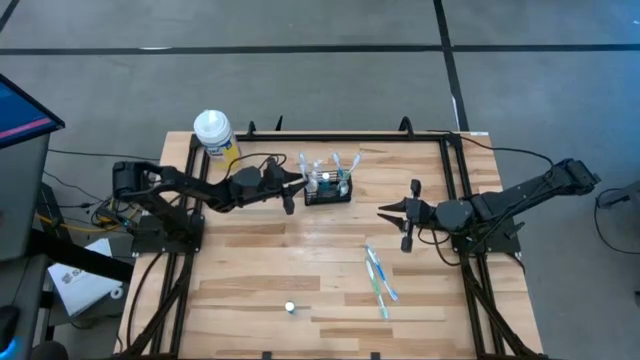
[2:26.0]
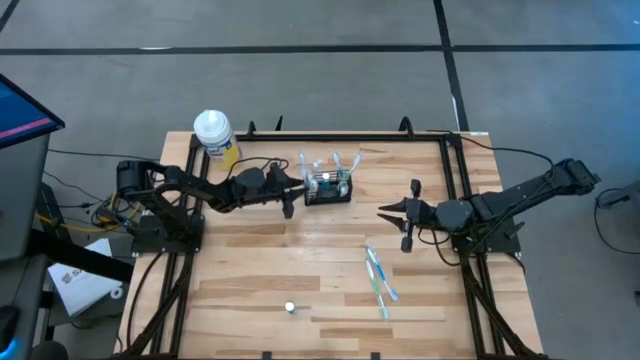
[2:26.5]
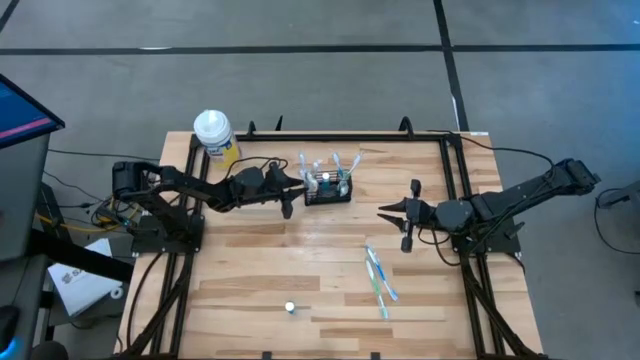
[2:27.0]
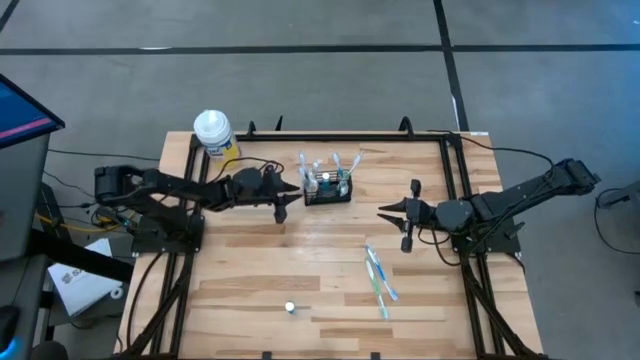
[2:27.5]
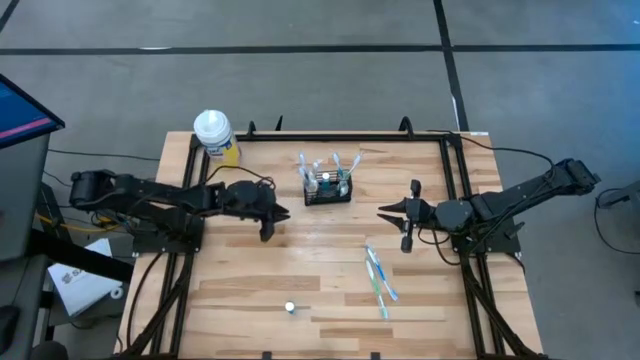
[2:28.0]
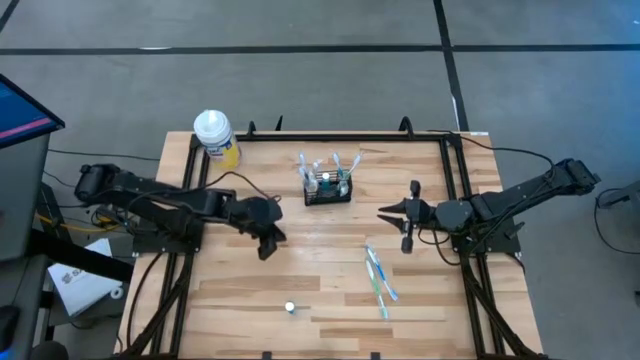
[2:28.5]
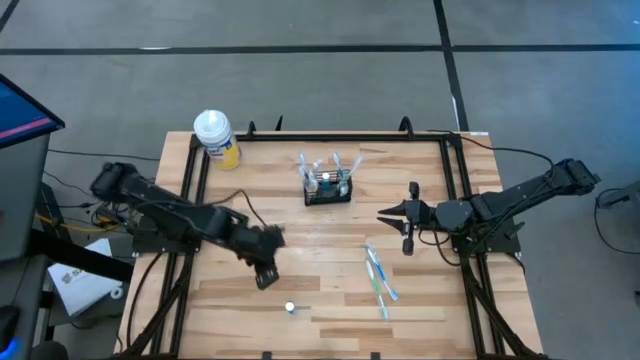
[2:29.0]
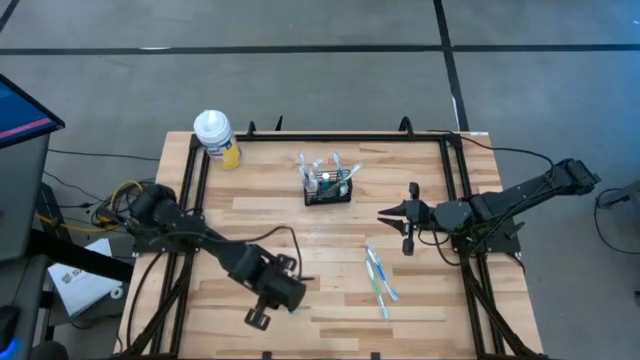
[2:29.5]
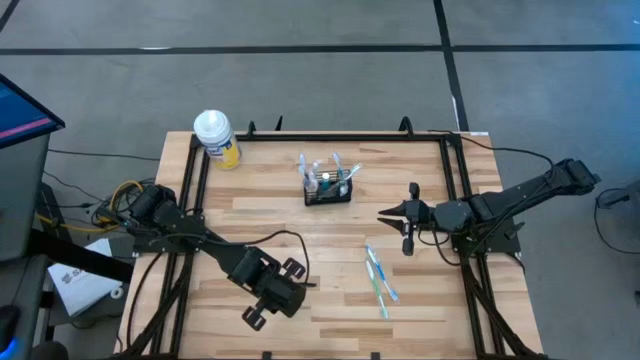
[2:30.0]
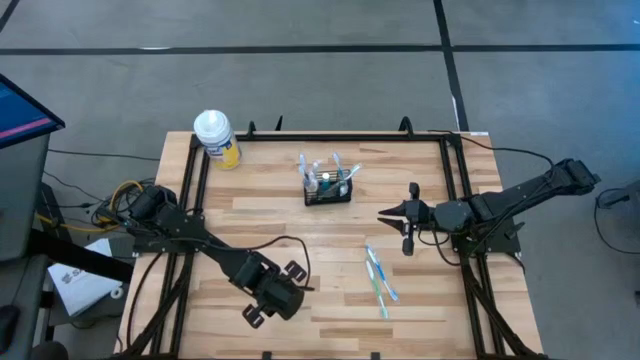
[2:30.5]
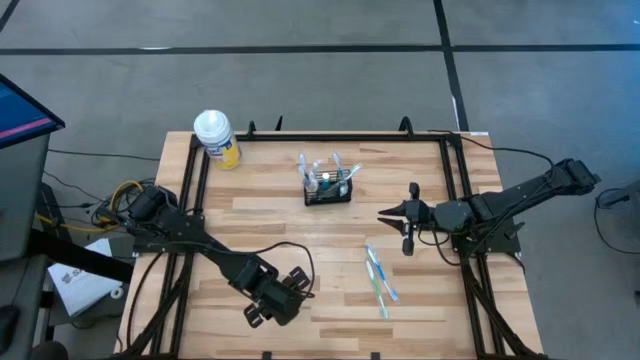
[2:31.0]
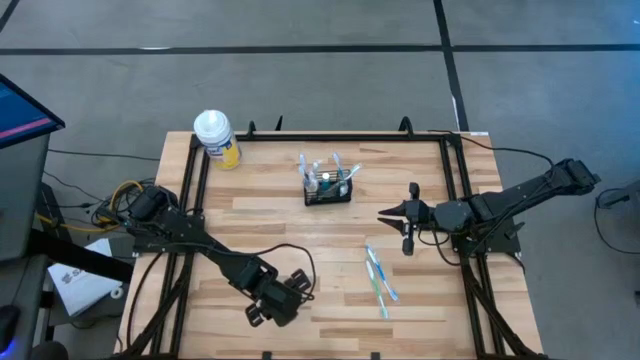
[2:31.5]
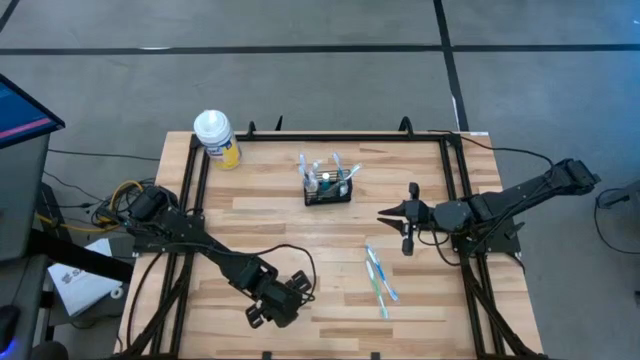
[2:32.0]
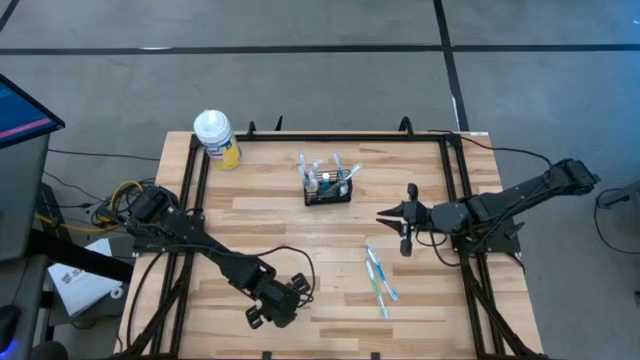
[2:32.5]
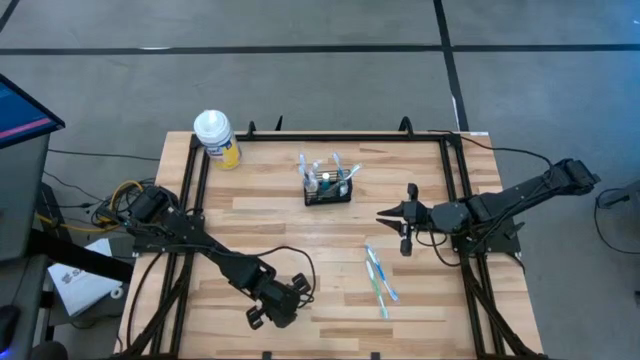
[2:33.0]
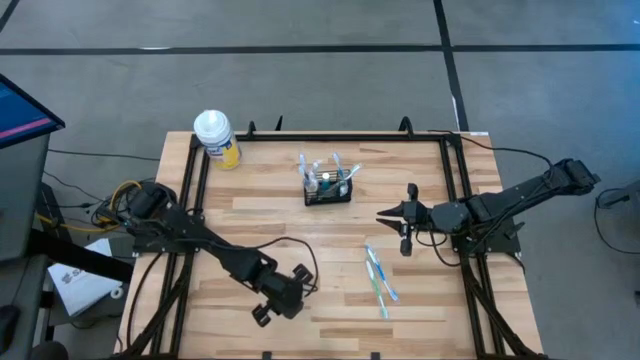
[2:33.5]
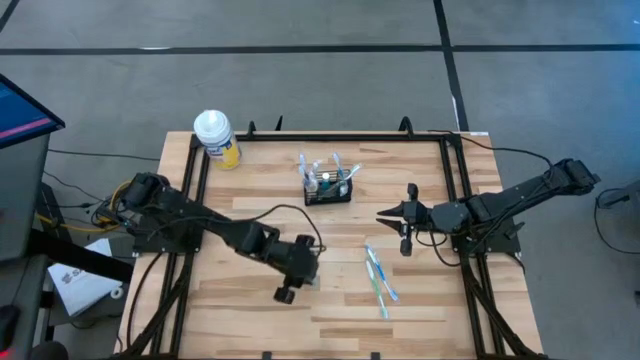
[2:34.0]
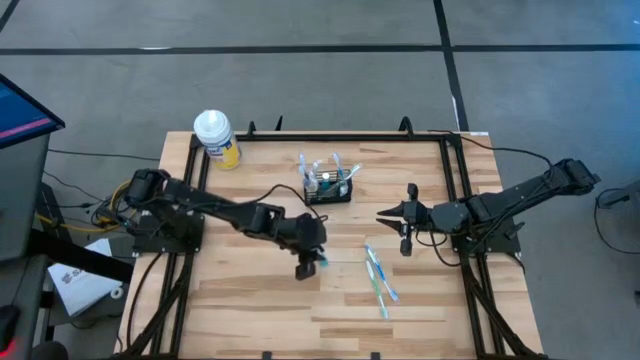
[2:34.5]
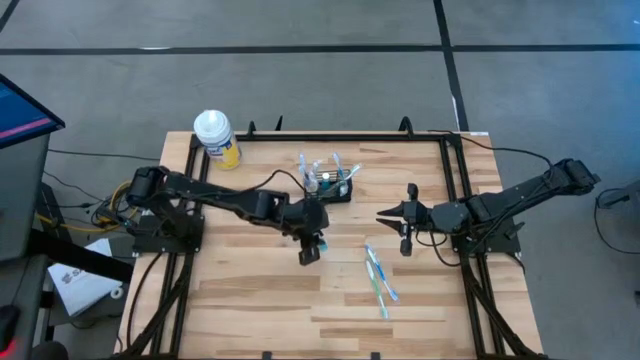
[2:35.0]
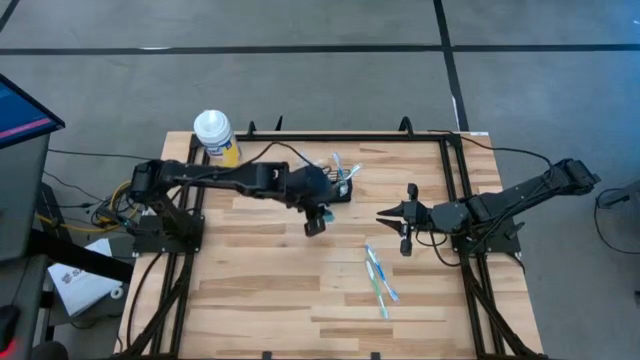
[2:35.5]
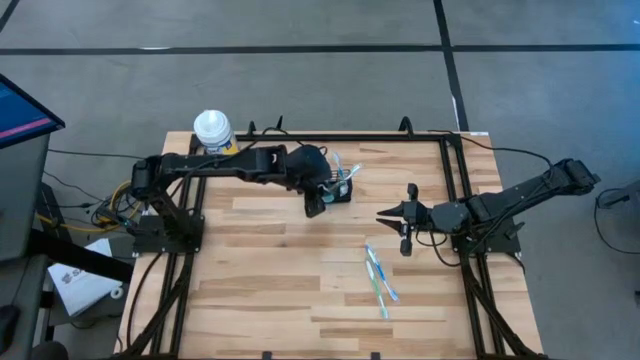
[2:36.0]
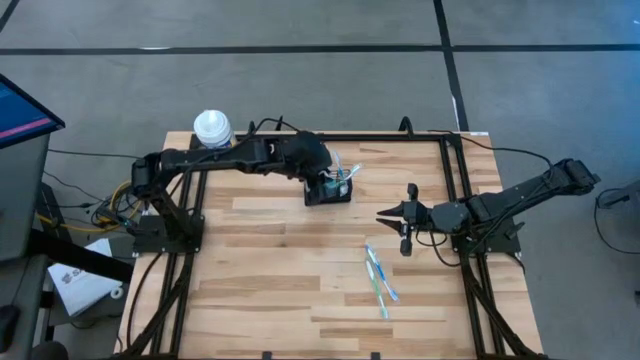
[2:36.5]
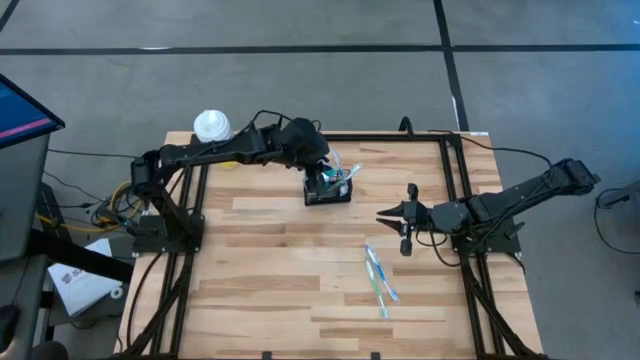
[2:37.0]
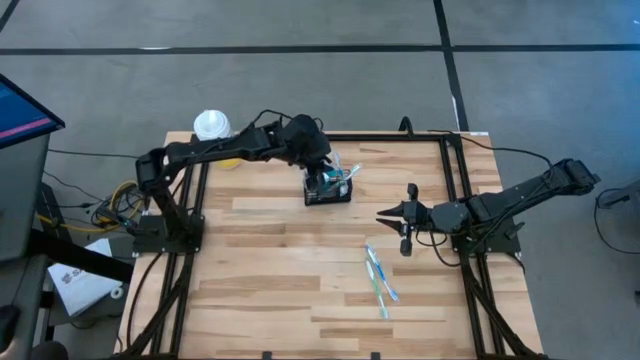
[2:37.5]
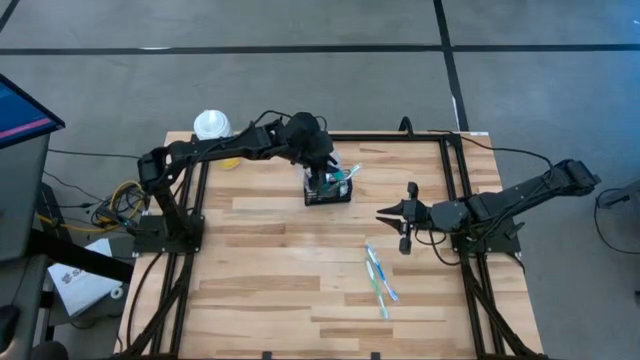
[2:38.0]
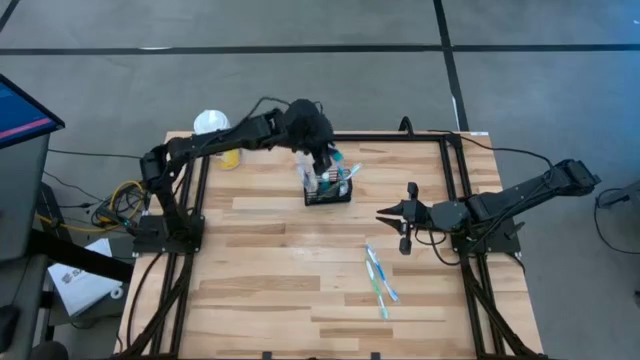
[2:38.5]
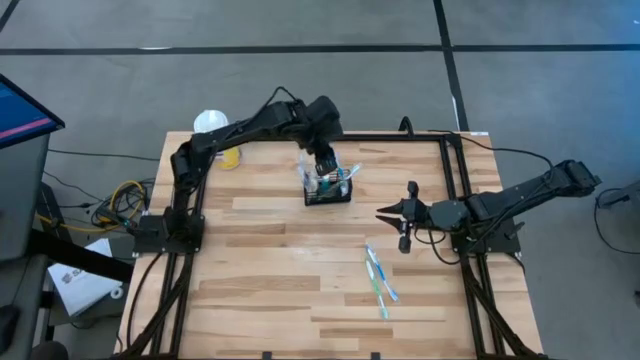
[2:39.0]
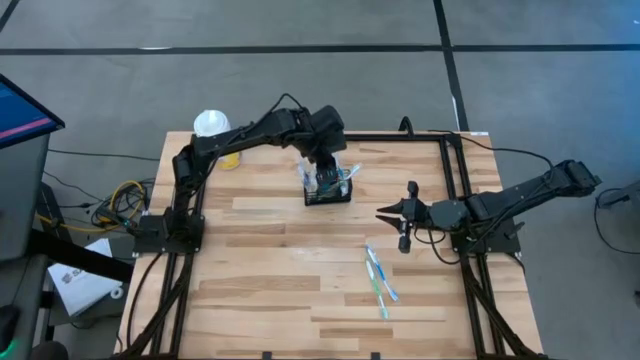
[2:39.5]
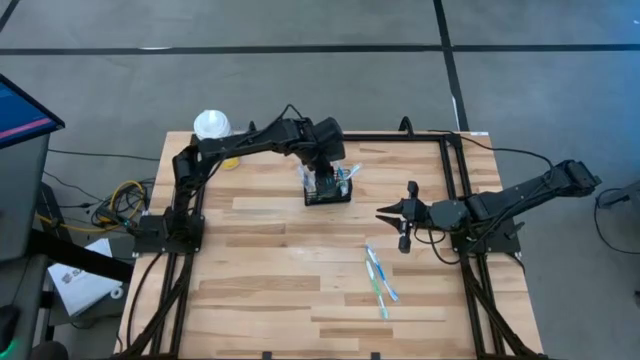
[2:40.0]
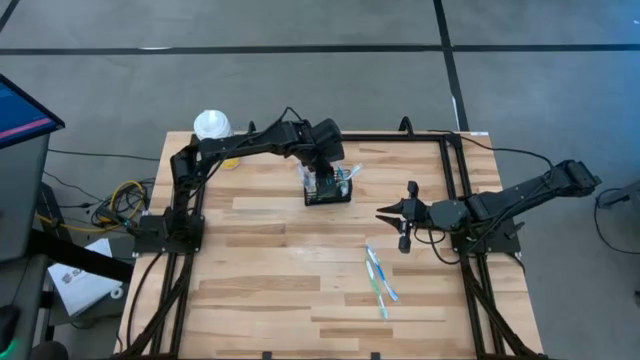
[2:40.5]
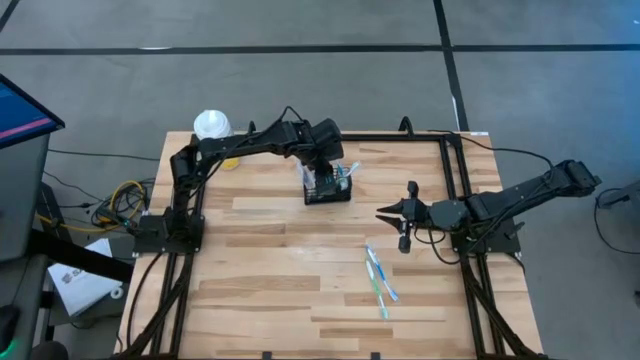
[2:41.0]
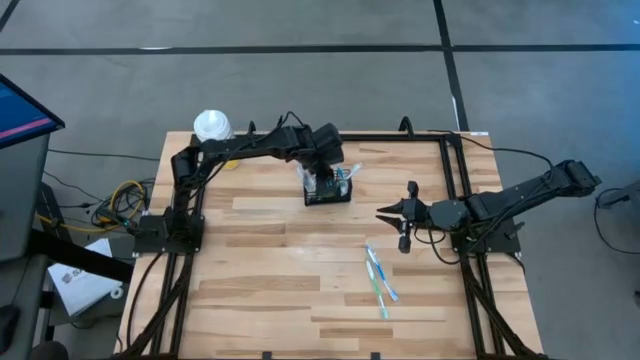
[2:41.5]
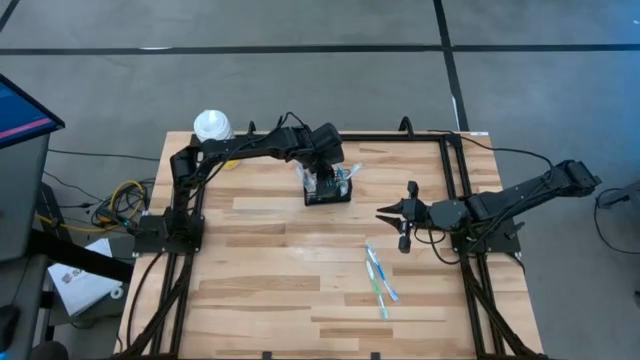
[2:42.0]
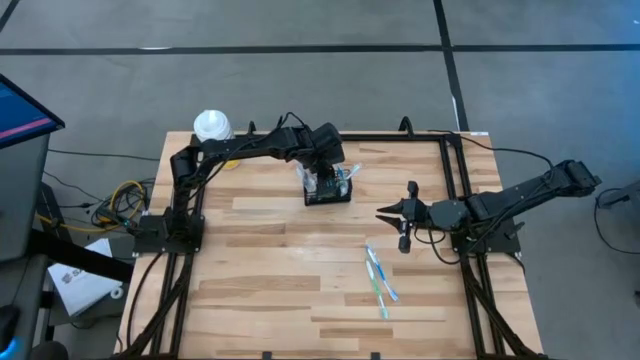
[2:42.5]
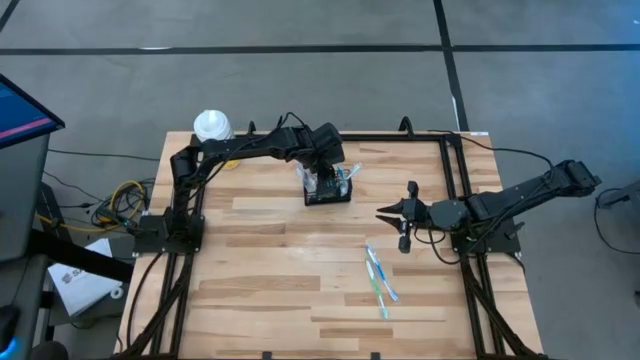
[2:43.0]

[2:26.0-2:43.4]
Task: Pick & Place toothbrushing station
Put the mouthwash into the black mesh organizer

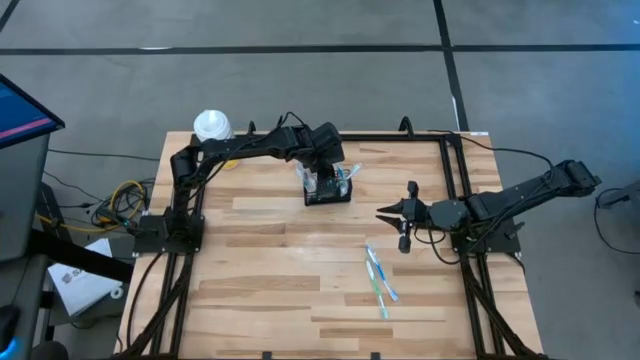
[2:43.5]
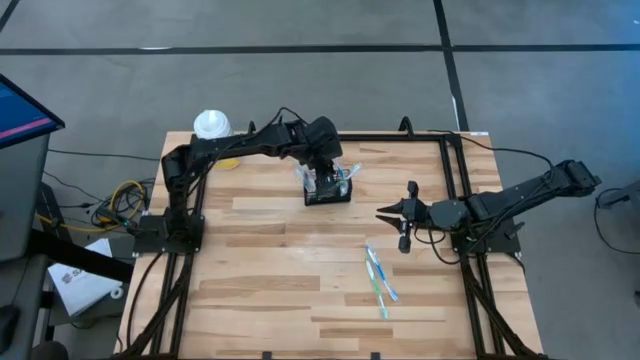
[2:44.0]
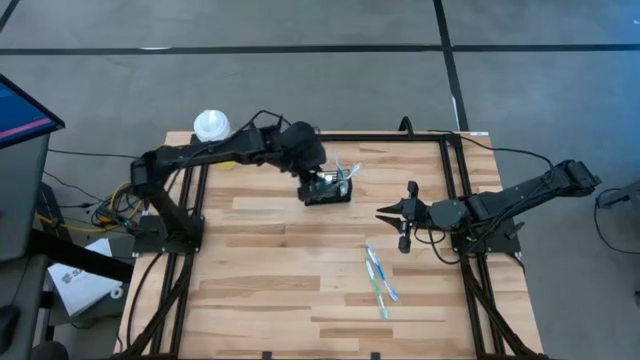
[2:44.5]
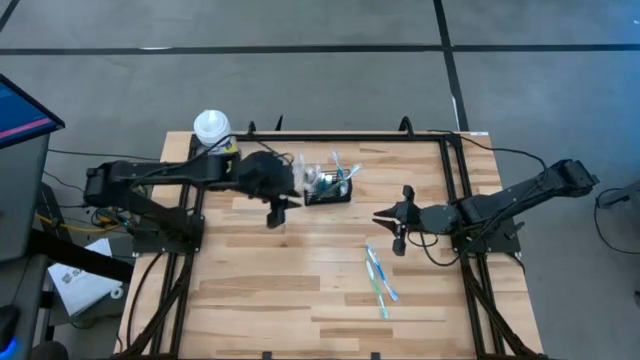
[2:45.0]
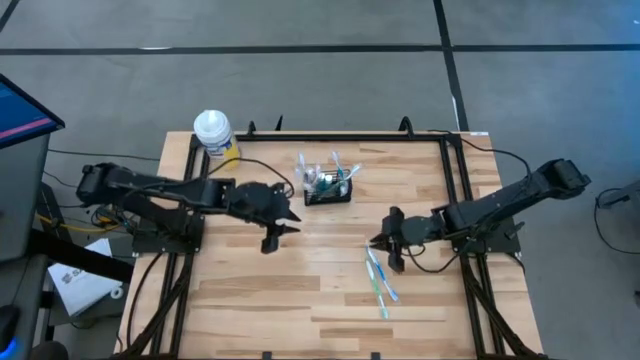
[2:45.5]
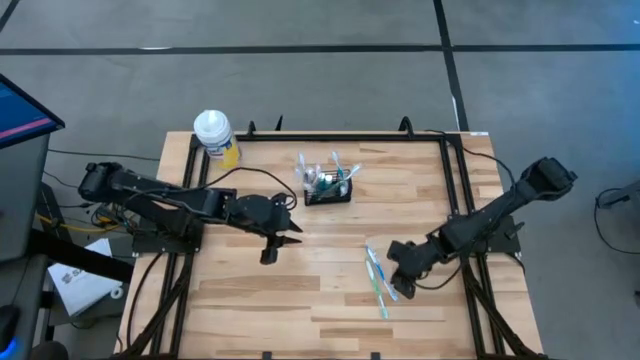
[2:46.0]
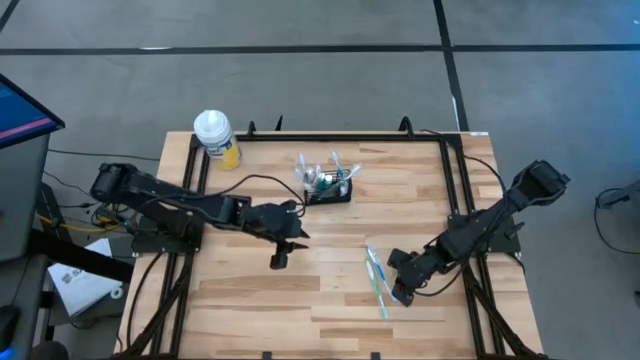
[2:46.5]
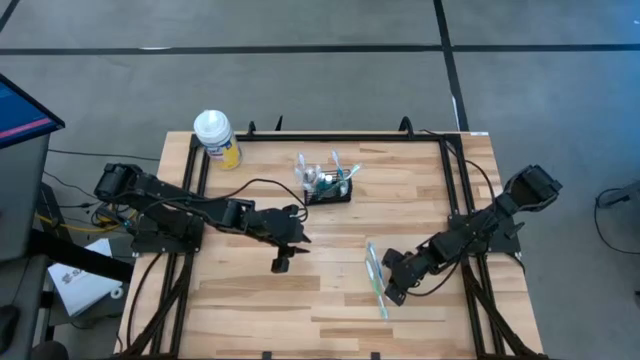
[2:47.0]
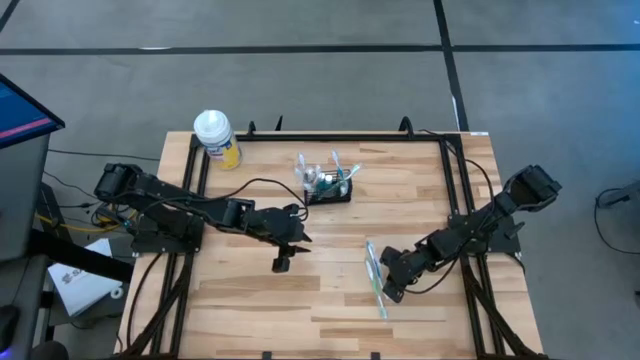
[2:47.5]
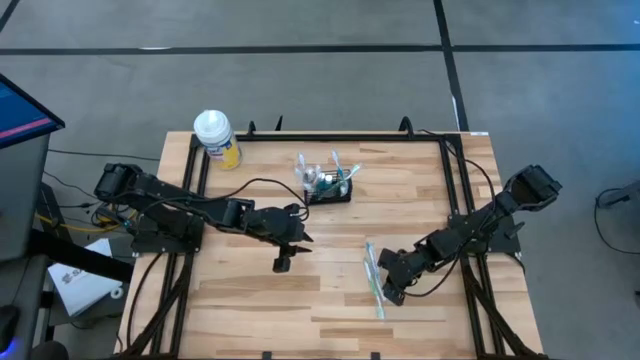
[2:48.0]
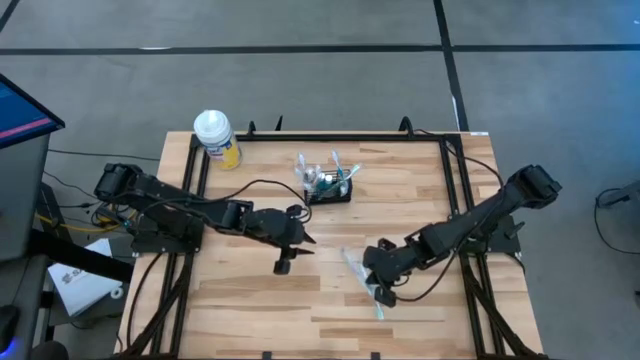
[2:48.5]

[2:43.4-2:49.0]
Put the blue toothbrush into the black mesh organizer
